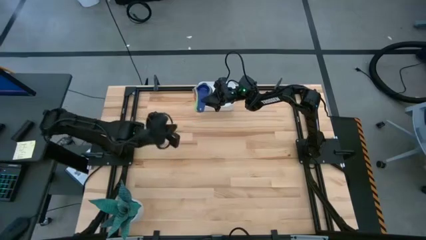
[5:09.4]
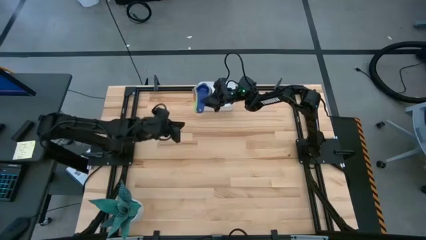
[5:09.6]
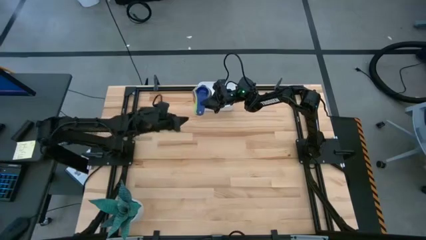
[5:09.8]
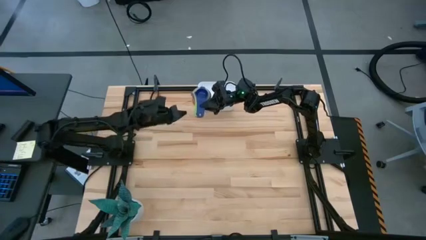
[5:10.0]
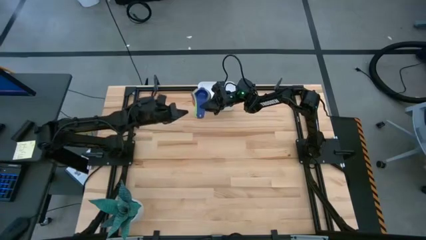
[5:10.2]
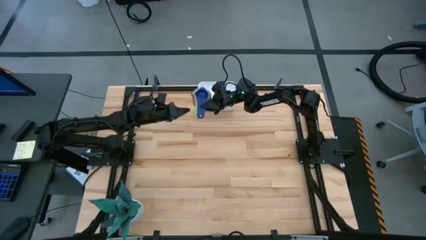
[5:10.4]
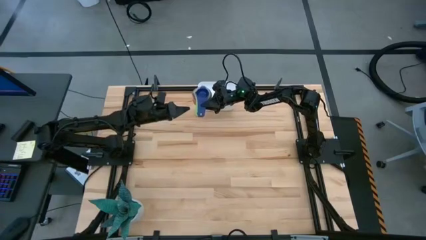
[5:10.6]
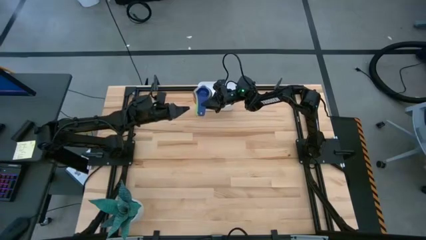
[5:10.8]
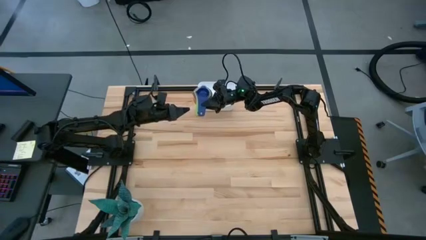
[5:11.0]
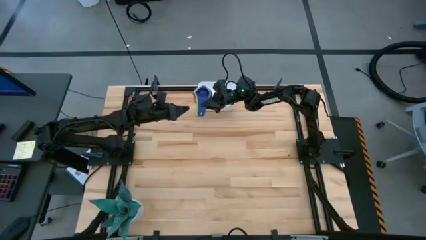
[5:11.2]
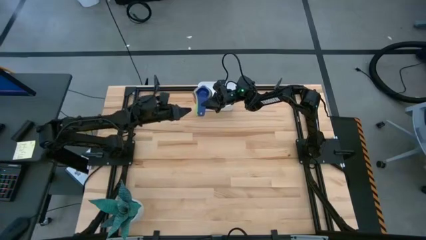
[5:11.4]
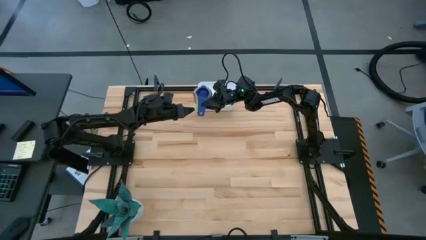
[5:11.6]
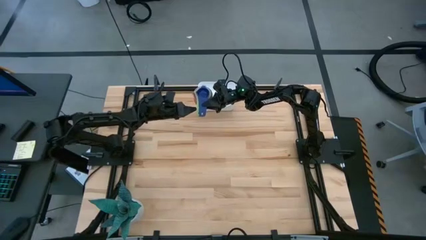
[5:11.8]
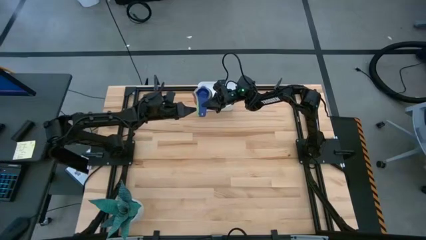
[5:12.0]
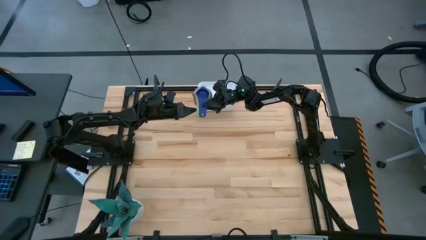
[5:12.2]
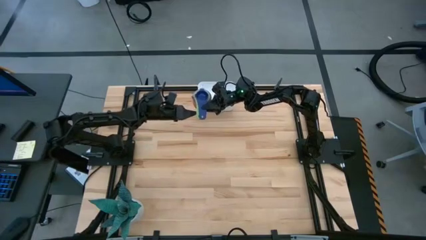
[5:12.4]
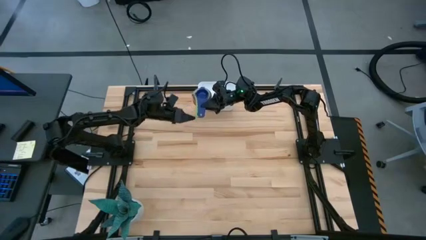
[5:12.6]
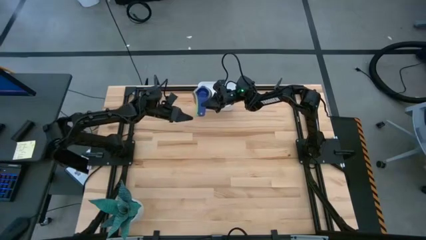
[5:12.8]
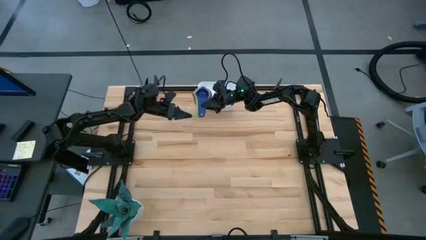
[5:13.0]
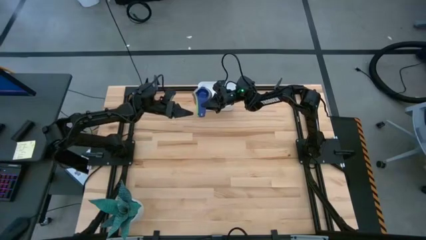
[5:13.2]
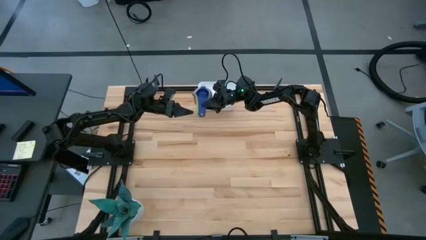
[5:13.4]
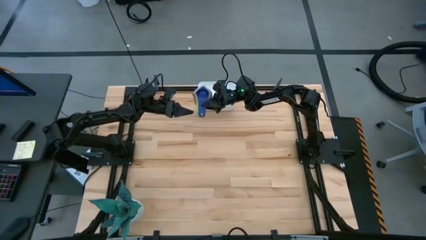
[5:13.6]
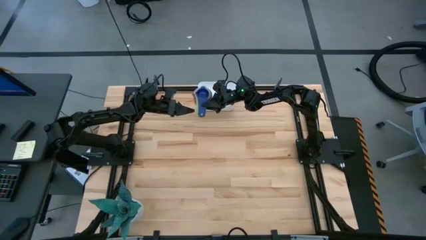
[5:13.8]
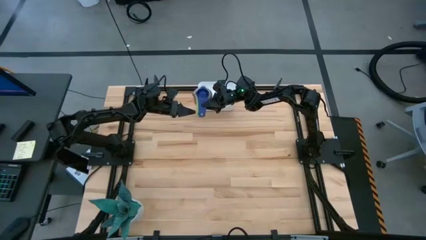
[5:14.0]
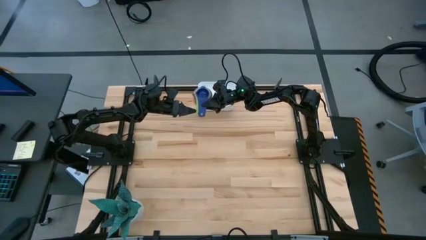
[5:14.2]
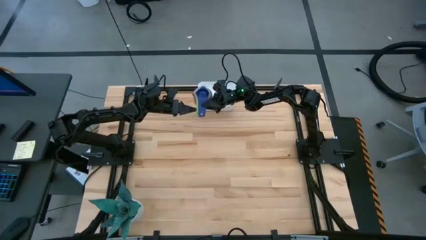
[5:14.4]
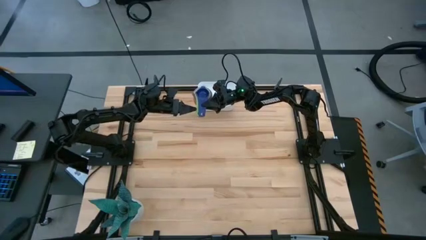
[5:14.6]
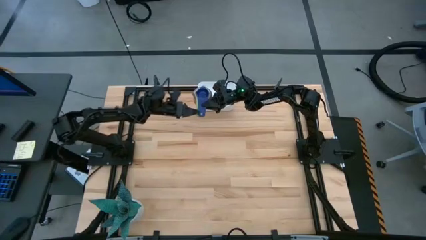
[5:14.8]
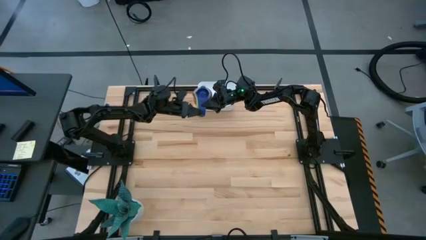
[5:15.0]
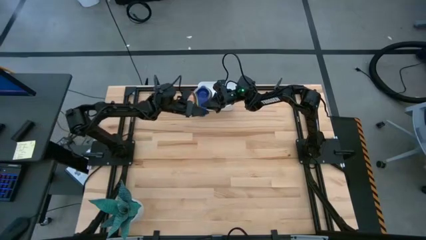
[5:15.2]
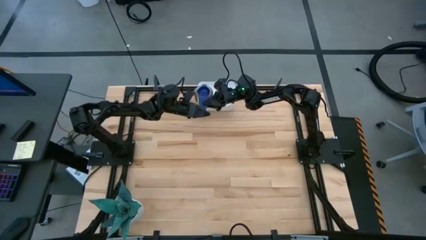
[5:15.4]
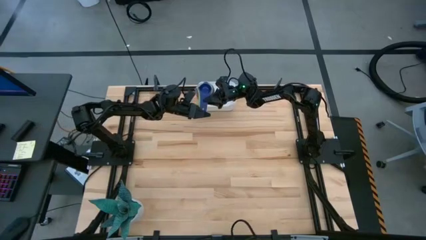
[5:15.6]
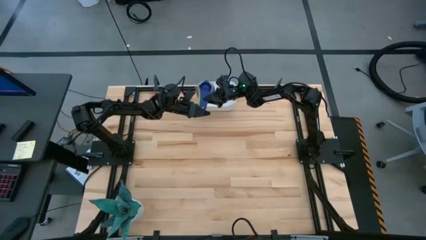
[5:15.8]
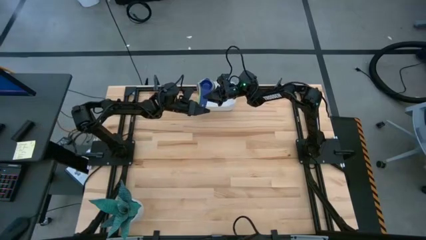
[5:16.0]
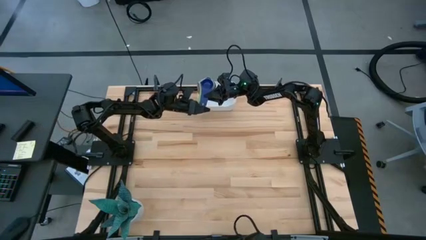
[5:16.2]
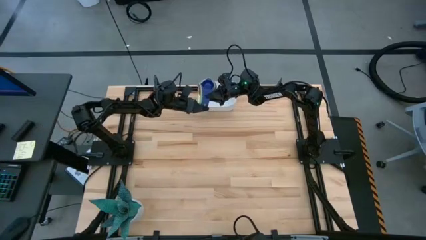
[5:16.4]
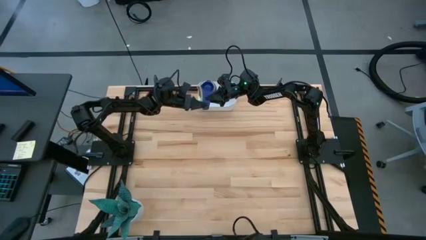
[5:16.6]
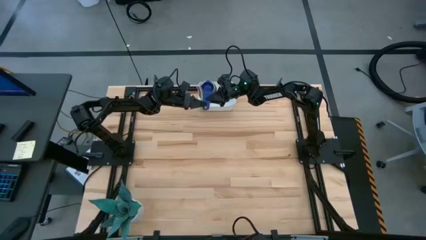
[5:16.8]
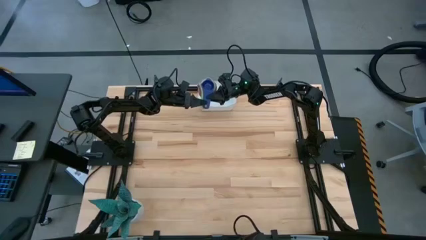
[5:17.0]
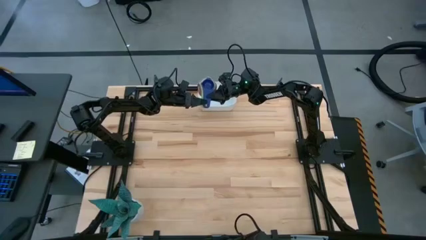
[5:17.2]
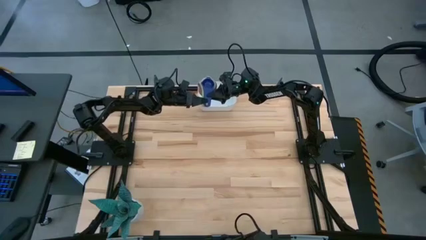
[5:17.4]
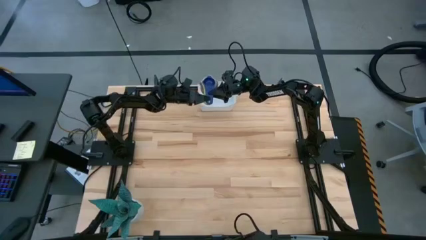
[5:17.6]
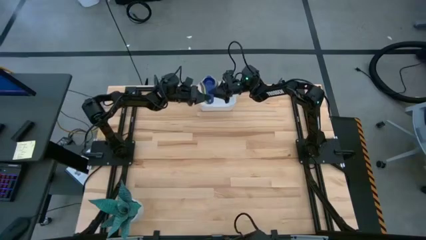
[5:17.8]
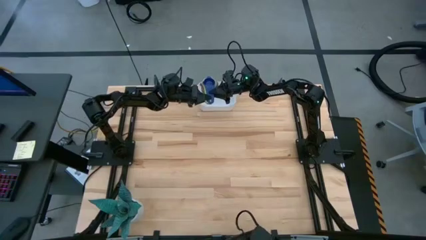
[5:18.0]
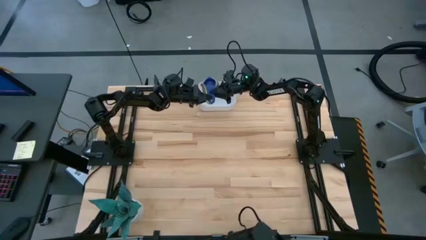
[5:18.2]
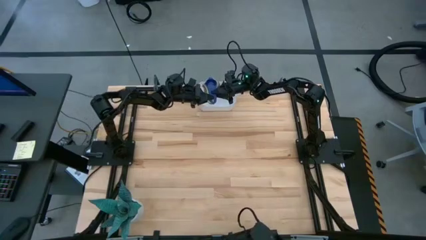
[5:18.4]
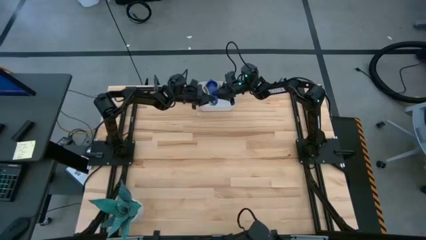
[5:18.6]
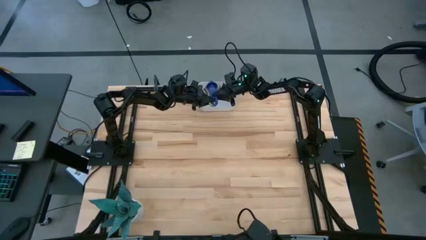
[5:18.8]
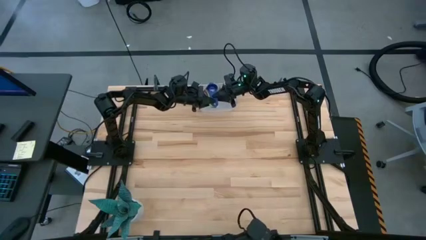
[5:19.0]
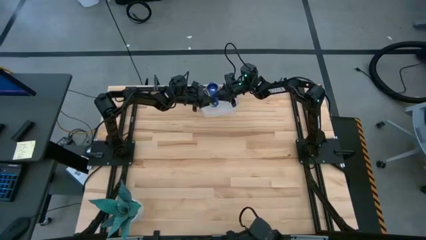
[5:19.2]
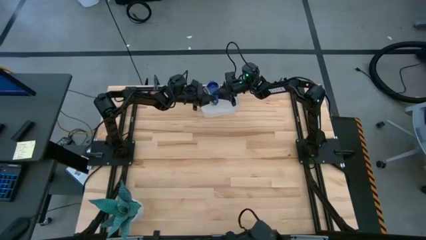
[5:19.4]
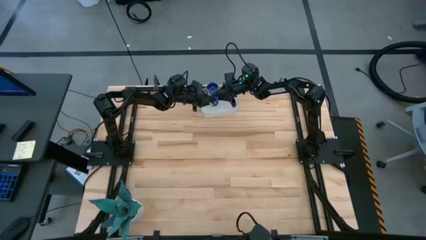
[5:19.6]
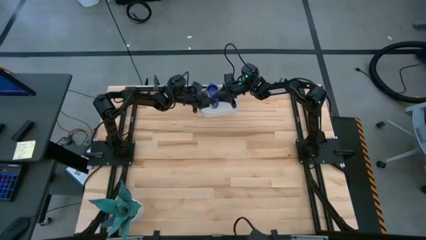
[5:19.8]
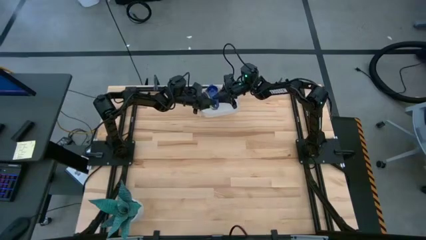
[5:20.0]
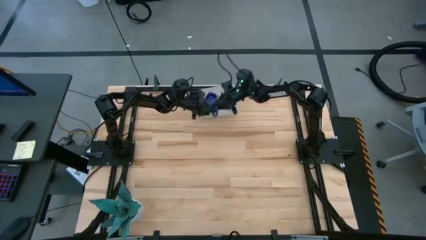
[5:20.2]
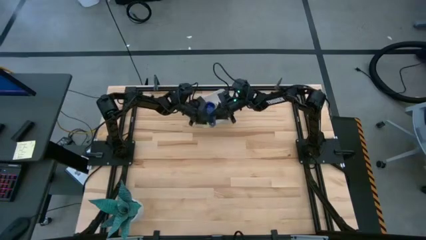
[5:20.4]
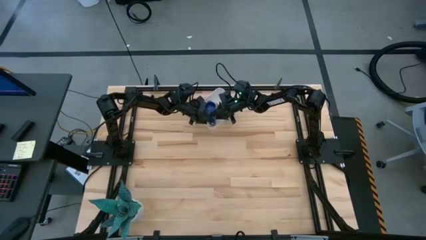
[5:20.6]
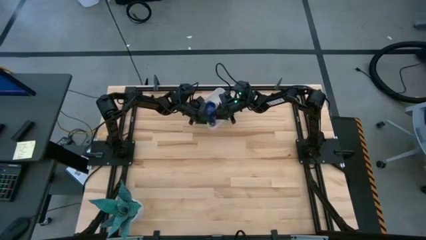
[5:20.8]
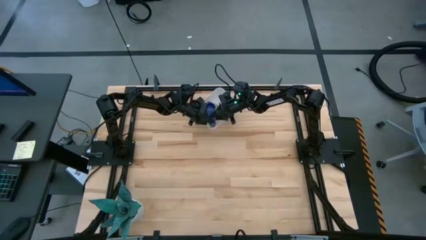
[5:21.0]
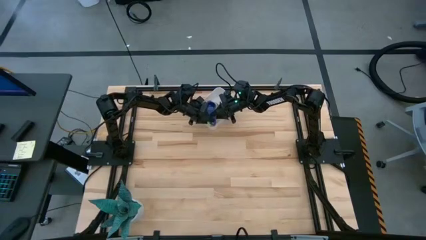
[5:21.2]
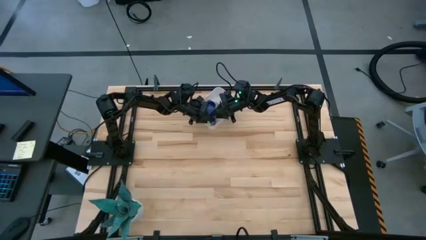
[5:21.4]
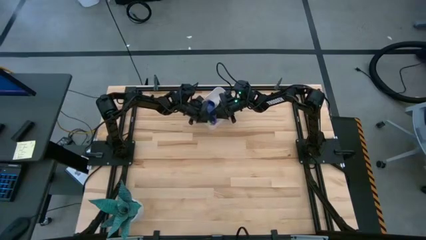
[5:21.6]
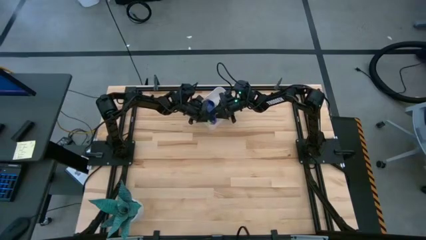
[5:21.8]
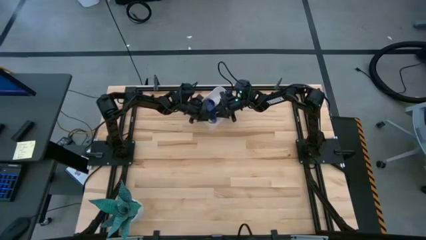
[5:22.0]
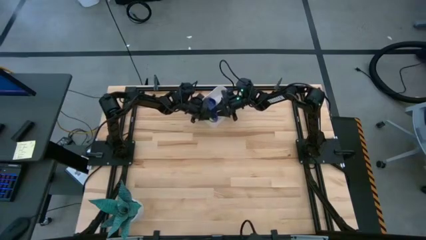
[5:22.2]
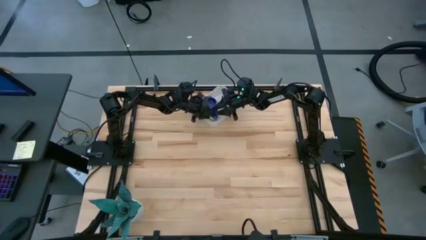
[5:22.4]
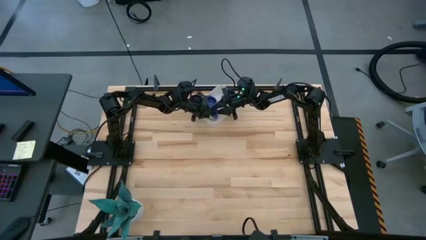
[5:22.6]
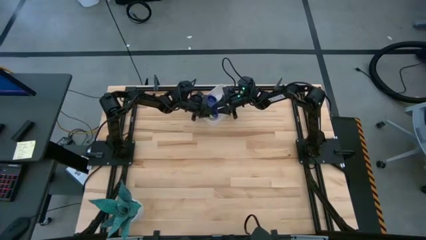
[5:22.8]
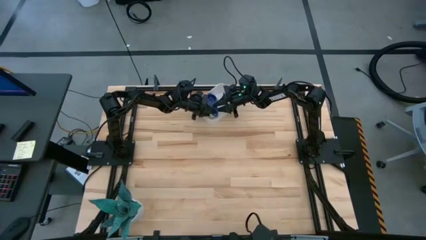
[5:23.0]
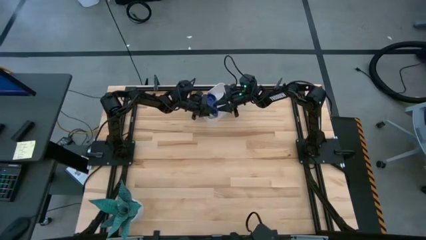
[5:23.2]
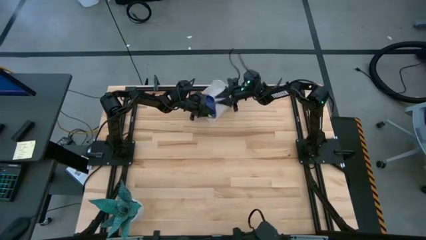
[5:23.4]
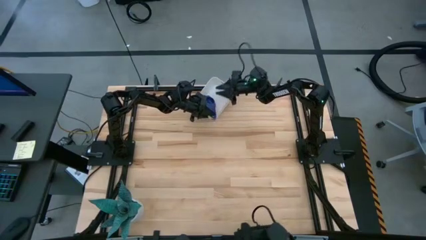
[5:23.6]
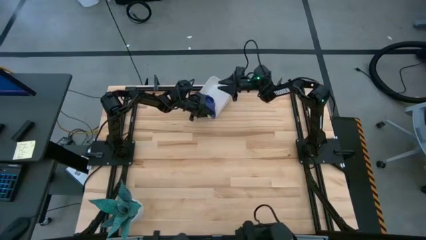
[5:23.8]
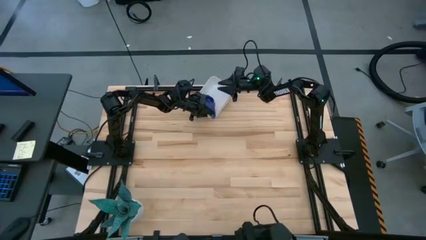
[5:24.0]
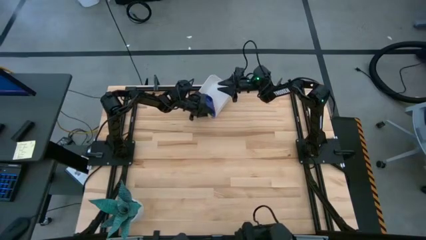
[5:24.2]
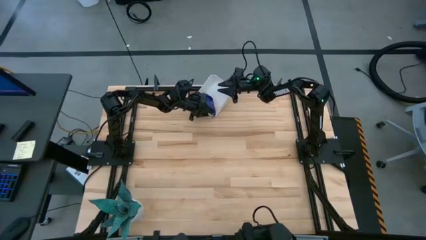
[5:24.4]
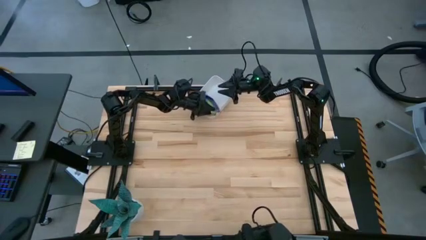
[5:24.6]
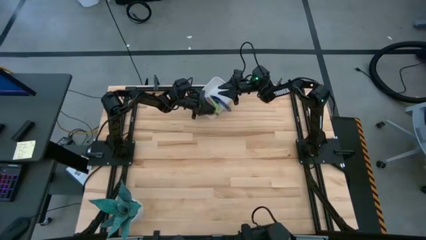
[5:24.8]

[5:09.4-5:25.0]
Task: Nest measuring cups in basket
Put the stacked measuring cups into the white bin
